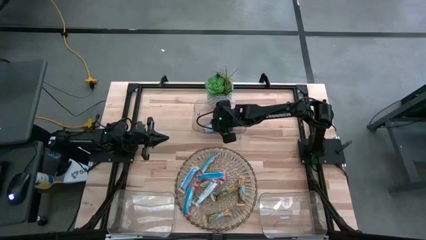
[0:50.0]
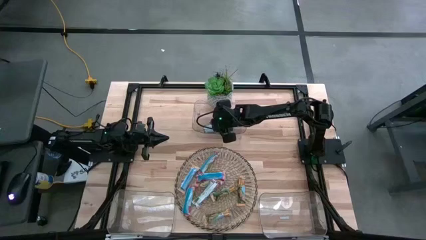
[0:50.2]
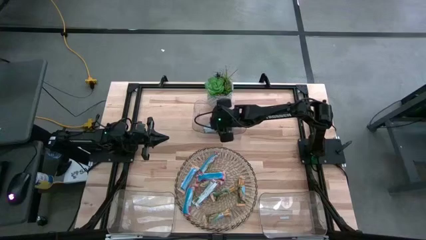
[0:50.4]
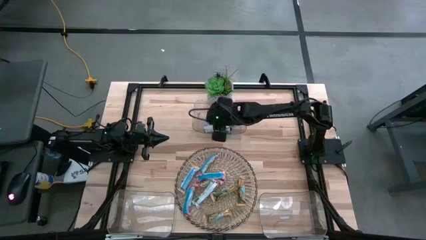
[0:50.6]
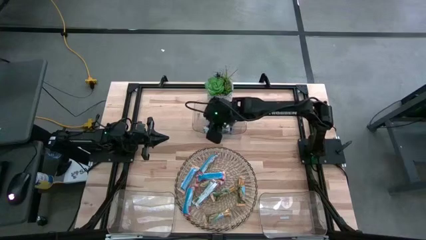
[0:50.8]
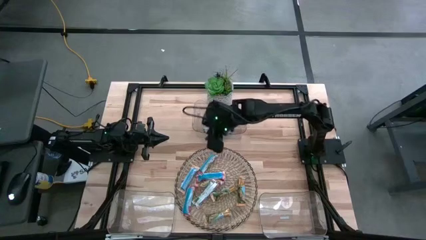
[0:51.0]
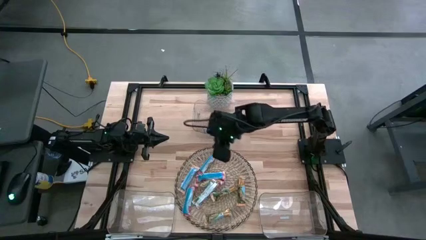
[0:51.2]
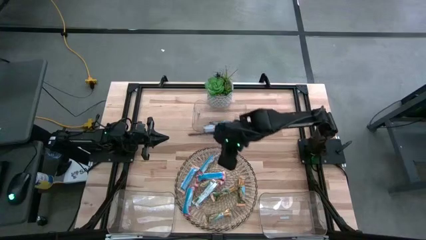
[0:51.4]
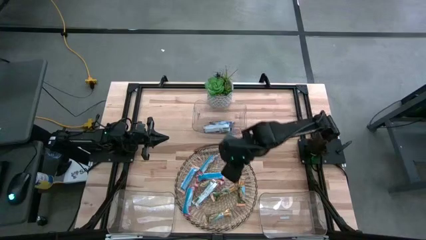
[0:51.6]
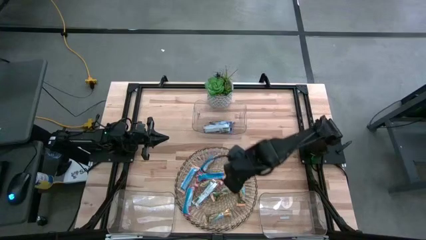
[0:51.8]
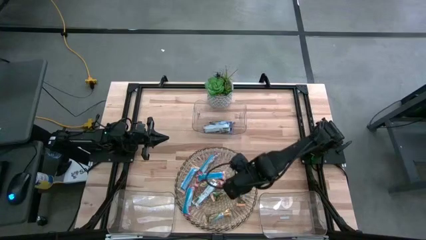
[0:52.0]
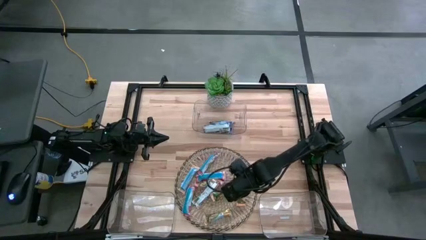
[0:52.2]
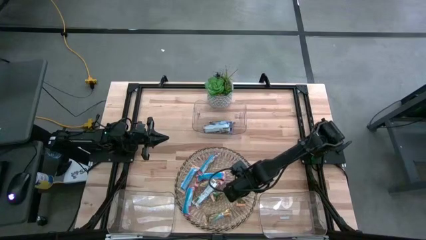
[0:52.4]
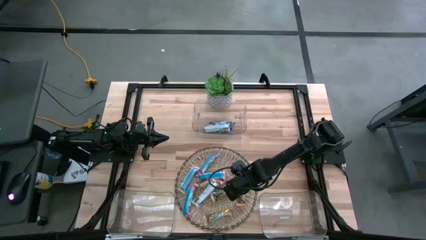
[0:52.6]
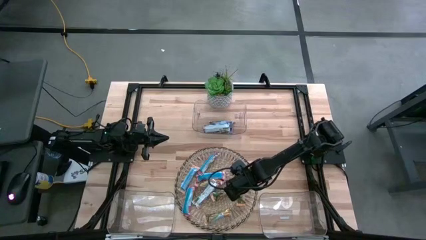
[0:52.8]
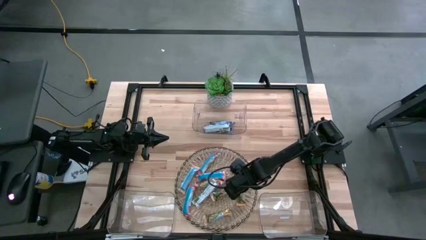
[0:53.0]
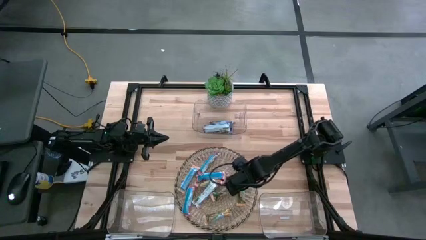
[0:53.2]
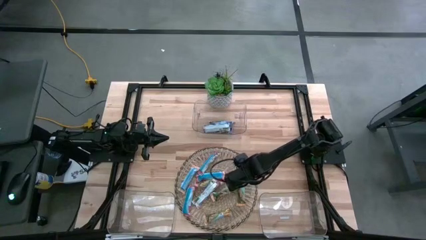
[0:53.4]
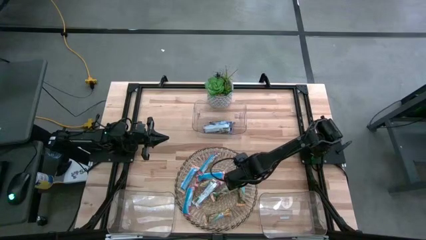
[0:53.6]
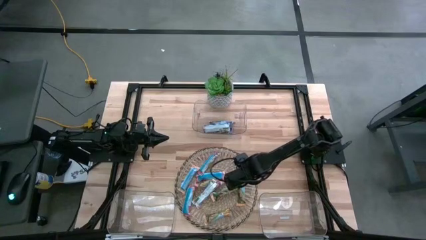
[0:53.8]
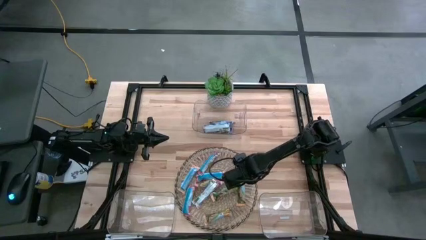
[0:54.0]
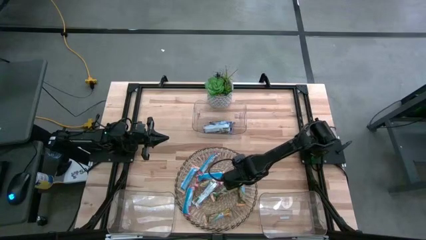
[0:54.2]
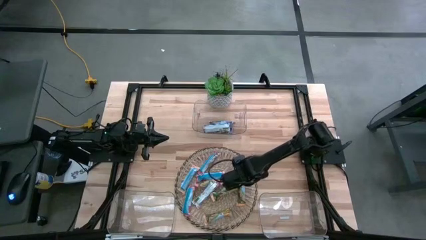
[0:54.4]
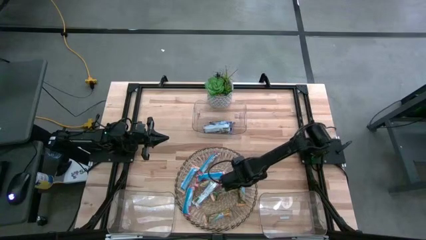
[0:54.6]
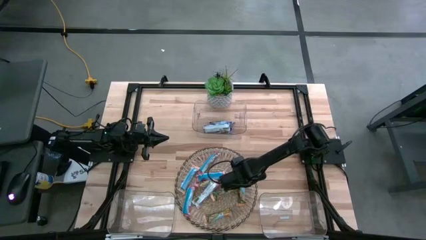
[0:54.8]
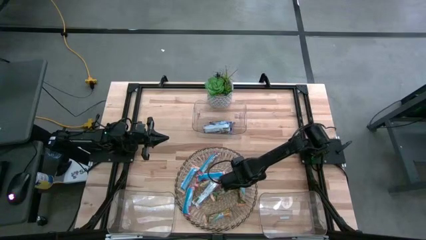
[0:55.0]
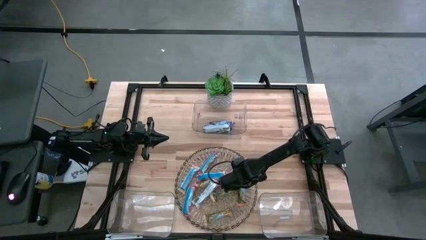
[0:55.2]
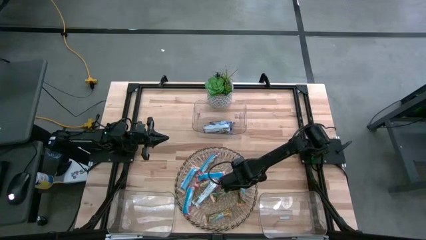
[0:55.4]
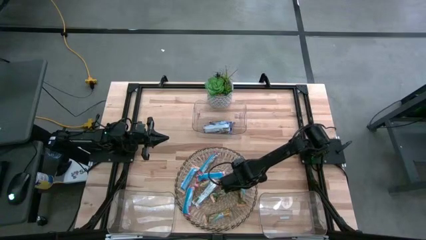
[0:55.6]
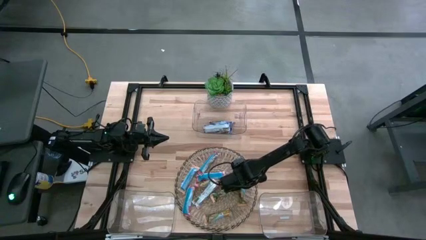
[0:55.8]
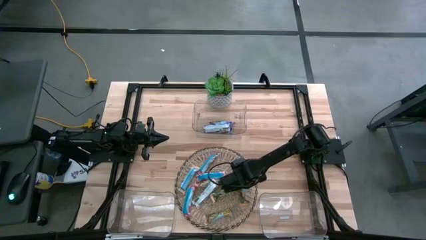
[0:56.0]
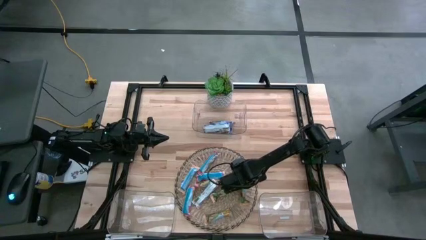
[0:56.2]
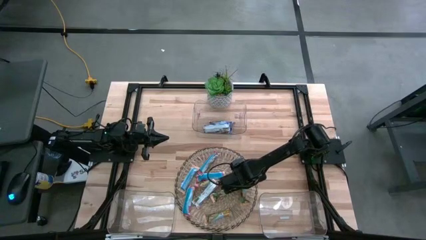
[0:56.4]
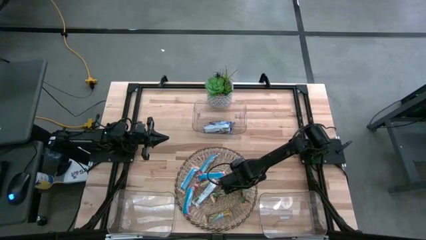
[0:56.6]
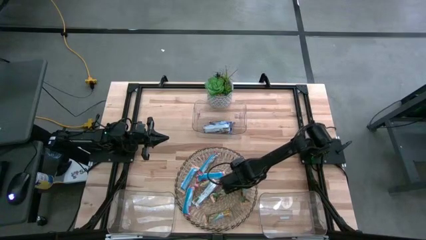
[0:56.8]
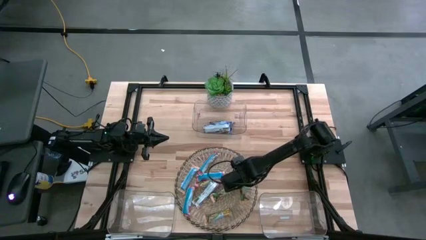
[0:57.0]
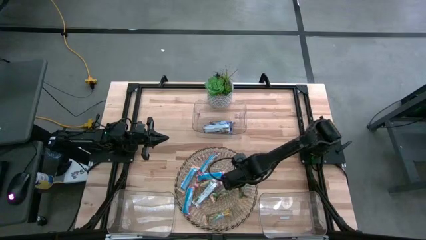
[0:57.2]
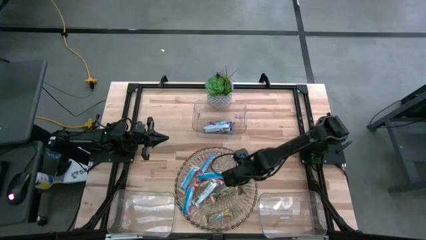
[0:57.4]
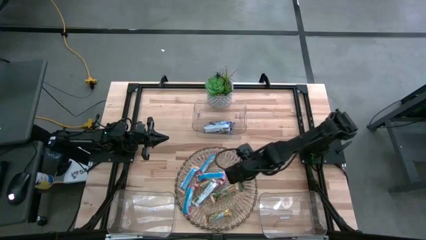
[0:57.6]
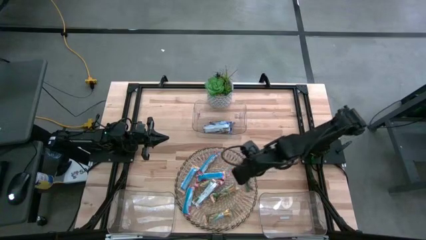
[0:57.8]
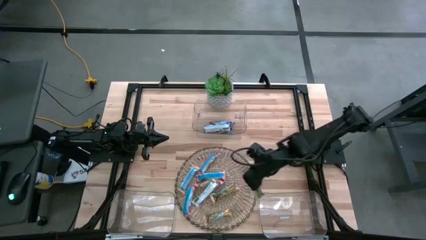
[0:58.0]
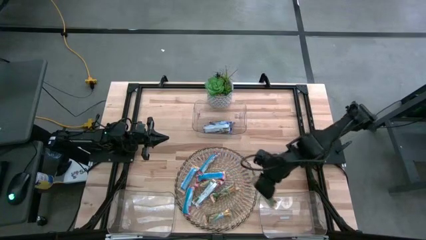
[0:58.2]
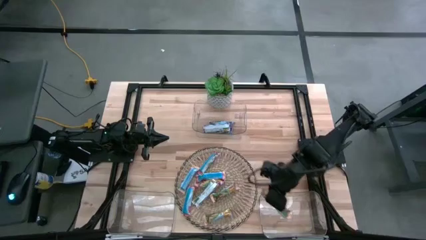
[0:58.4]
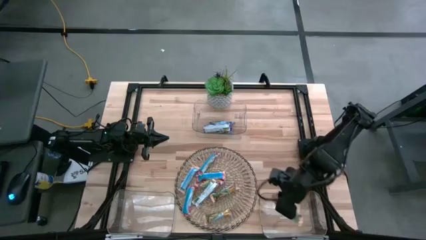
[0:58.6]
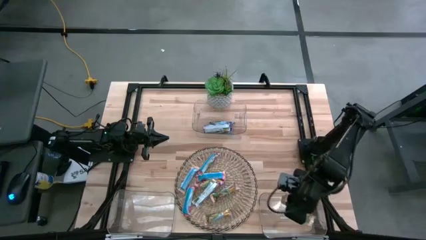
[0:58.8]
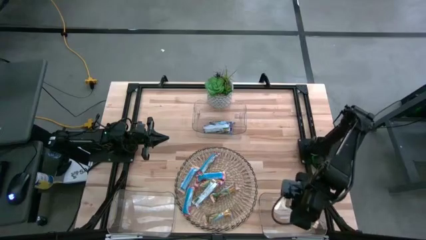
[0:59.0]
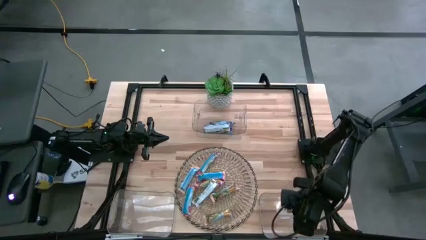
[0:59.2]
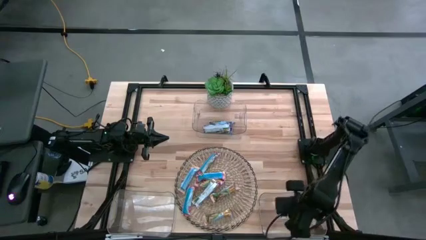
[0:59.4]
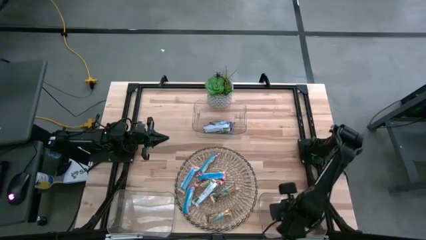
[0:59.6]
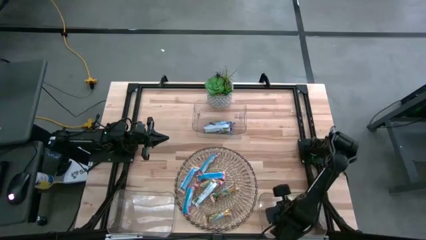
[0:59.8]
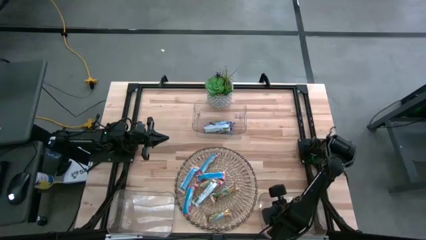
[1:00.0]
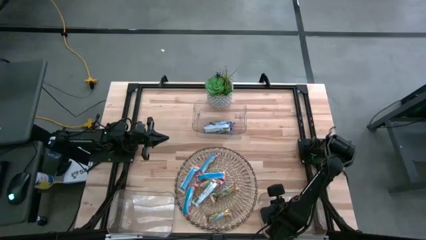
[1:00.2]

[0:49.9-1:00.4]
Task: Pick and place Granola Bars by type
Put the yellow granola bar into the bottom right transparent bin

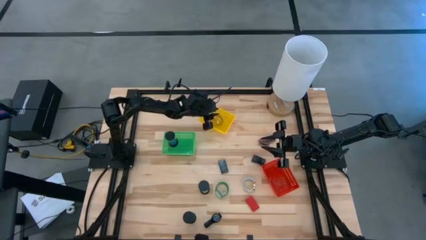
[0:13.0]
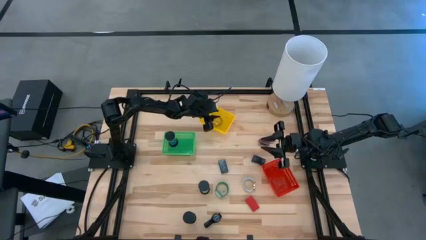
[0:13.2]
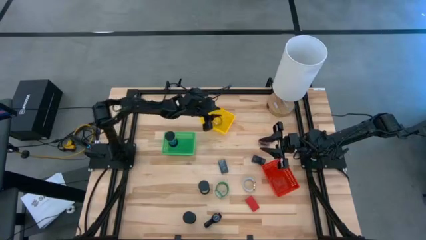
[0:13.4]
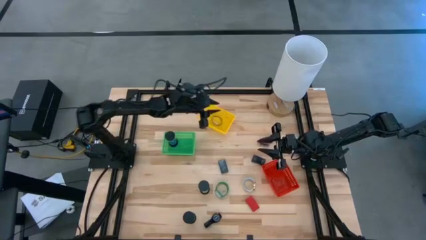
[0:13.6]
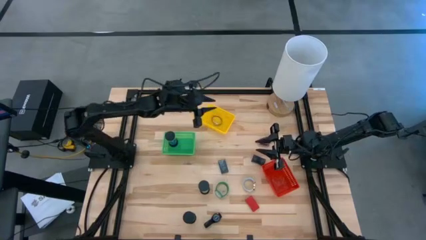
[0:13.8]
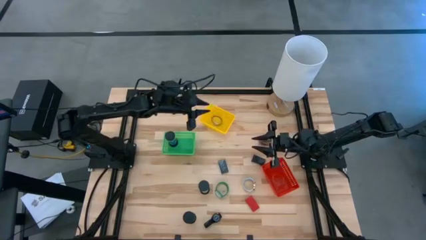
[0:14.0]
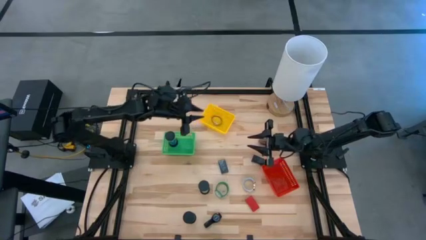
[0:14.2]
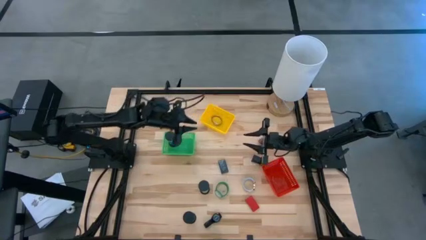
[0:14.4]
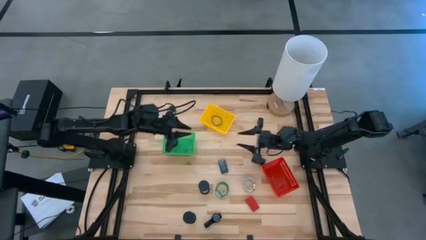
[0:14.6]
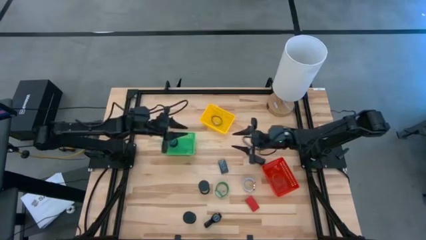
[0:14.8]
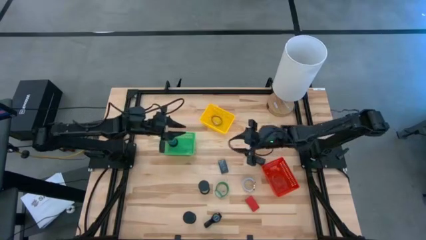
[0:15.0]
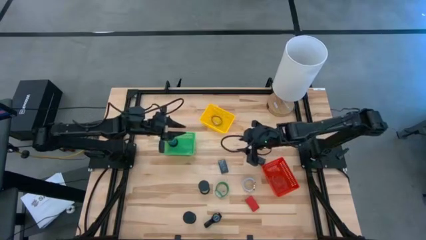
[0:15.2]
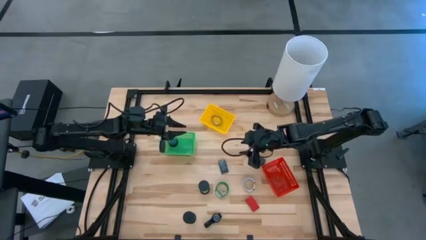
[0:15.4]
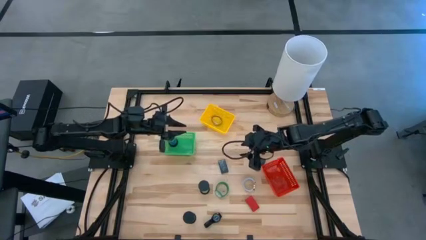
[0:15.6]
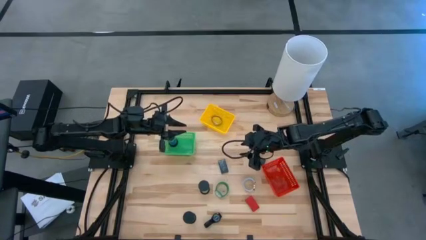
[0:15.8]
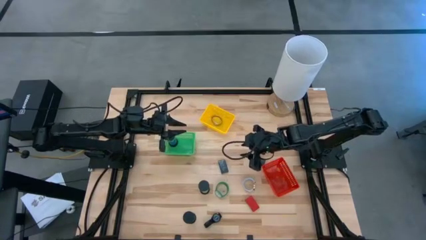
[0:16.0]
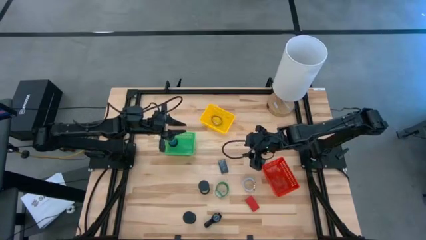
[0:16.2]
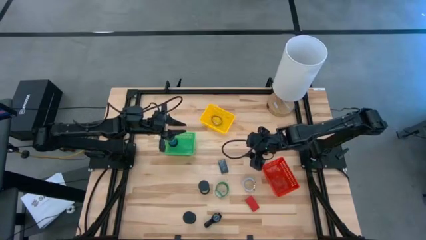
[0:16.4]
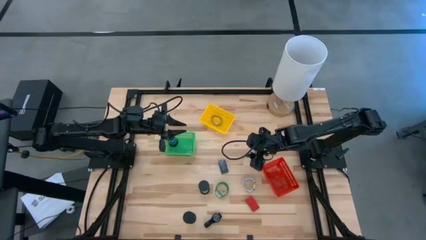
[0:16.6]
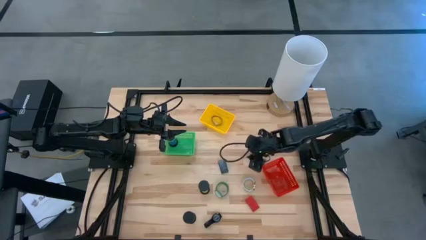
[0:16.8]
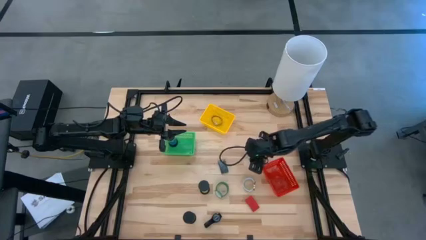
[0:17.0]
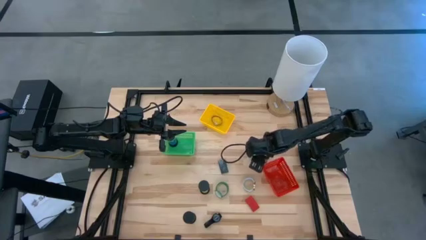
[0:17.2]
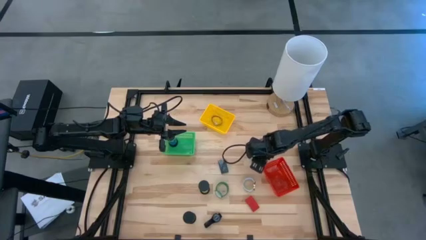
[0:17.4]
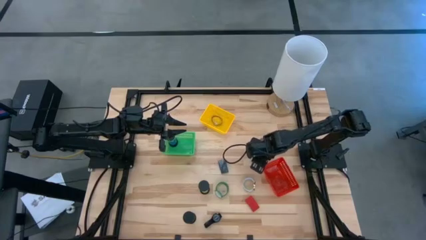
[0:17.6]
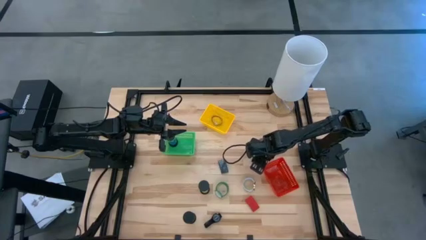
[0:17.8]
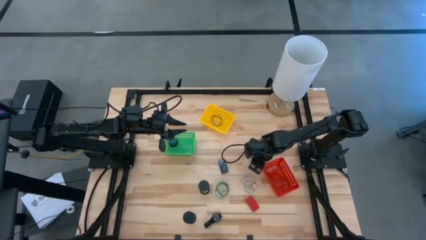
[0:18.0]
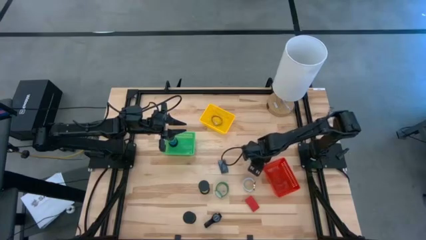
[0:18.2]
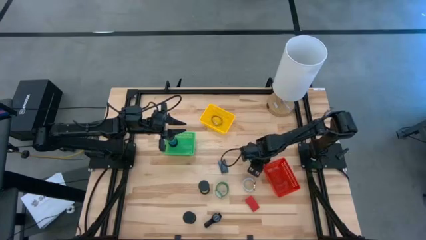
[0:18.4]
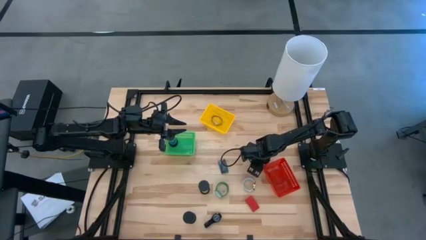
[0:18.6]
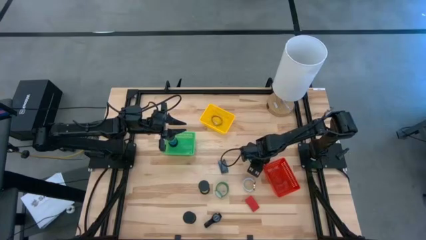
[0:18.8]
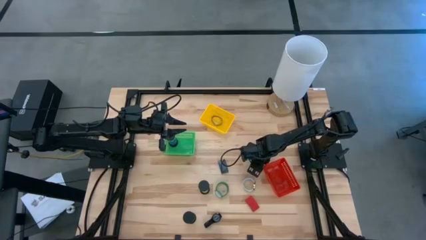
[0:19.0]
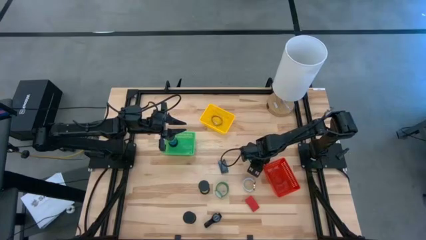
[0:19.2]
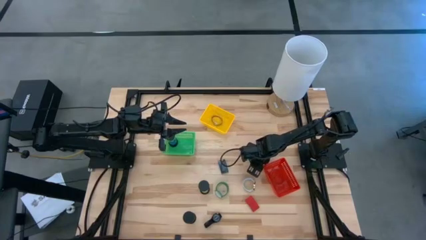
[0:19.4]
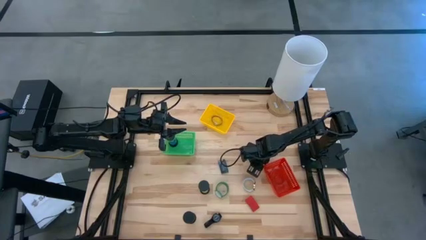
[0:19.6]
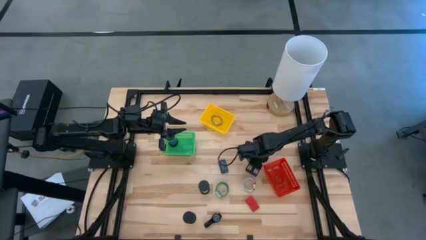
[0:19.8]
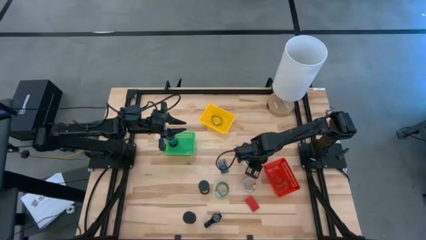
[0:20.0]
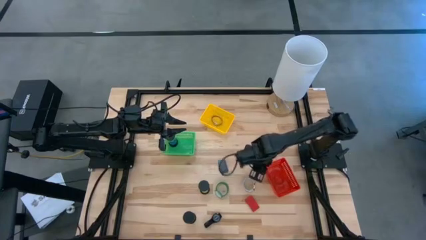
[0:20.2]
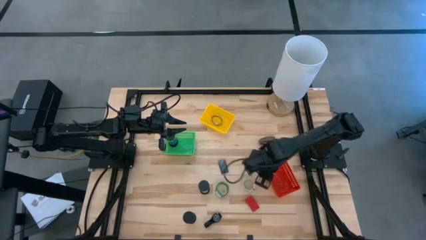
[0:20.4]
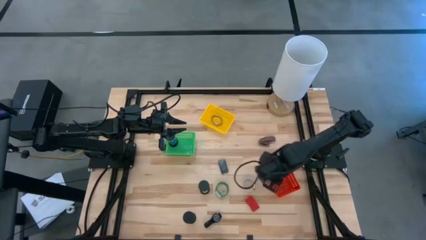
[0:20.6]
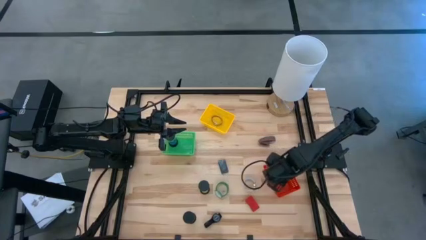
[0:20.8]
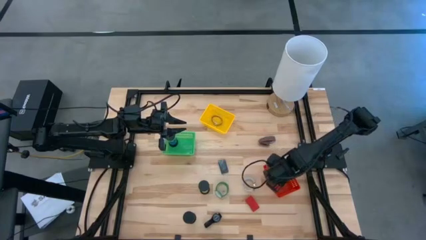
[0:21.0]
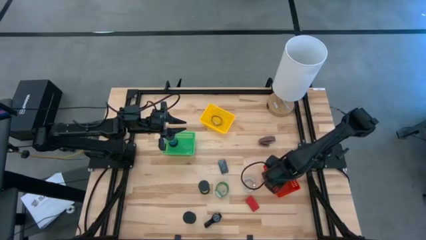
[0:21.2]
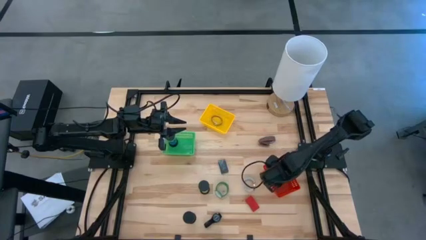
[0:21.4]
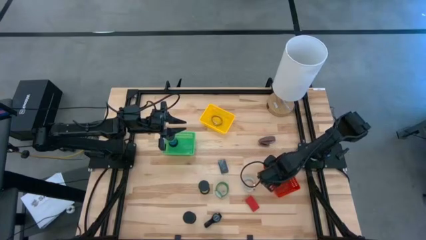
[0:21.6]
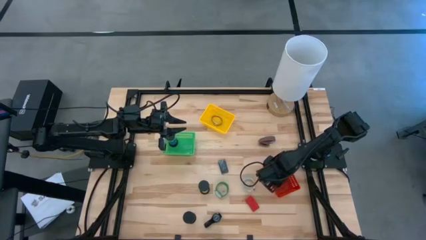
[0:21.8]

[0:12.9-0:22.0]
Task: Pick & Place Office items
Put the right black digital clock into the red basket
